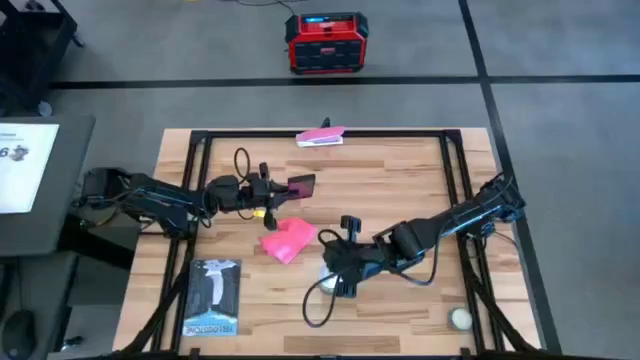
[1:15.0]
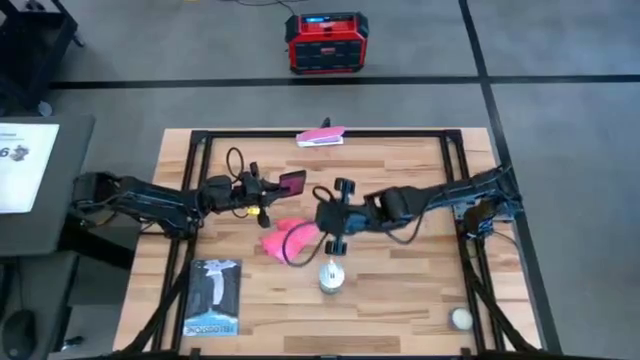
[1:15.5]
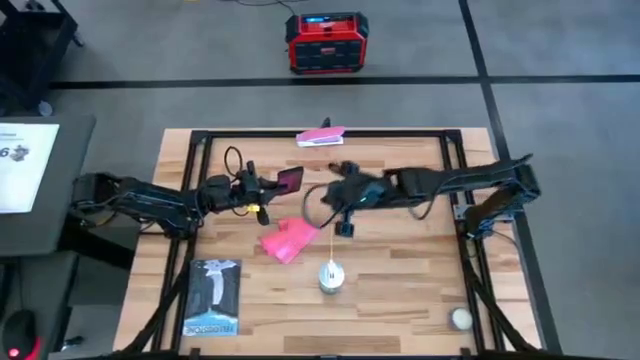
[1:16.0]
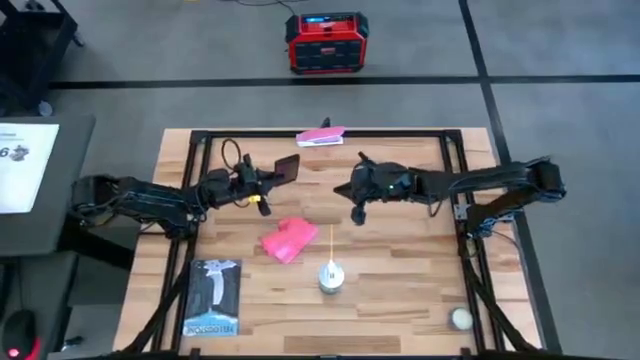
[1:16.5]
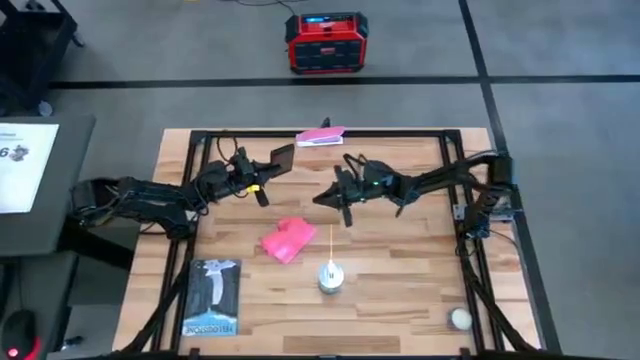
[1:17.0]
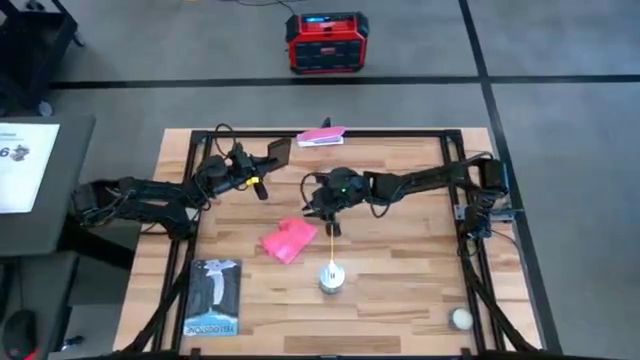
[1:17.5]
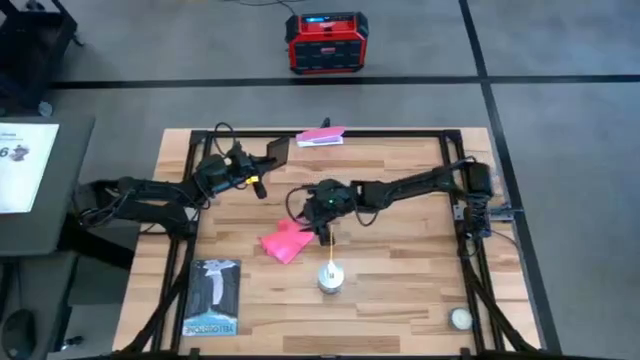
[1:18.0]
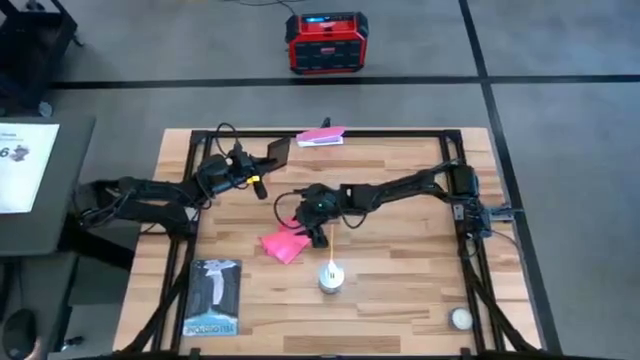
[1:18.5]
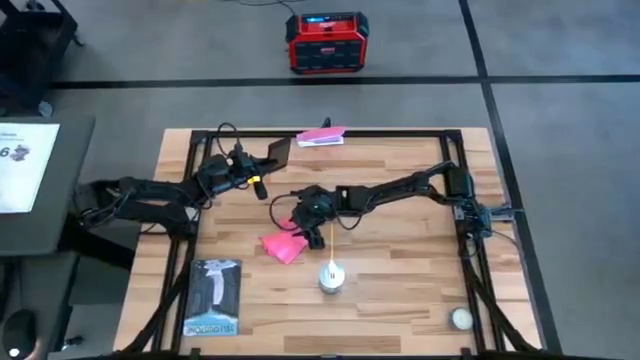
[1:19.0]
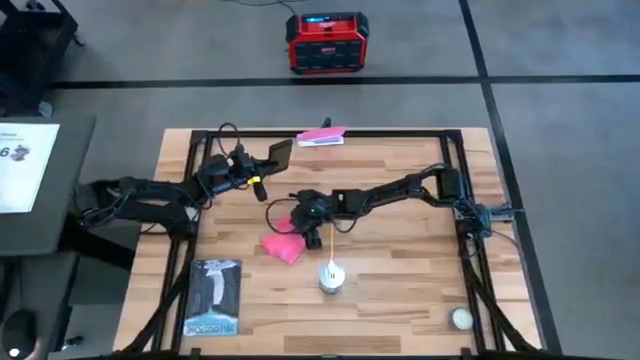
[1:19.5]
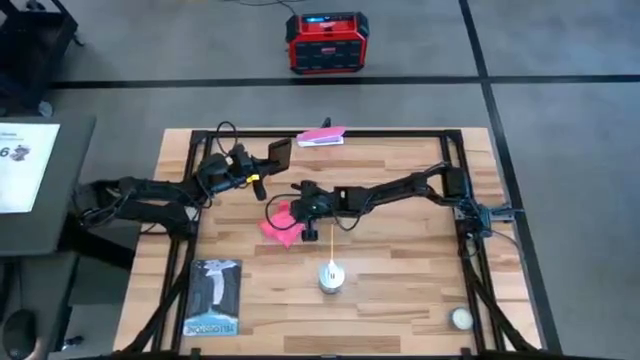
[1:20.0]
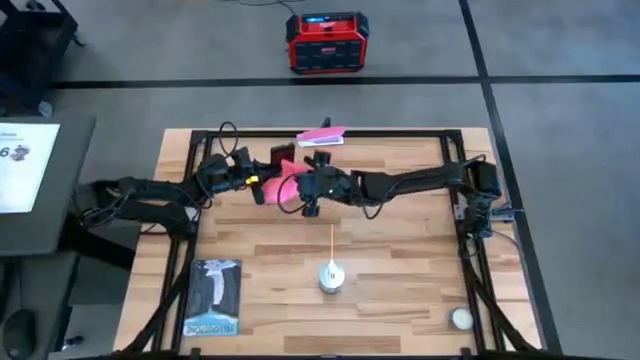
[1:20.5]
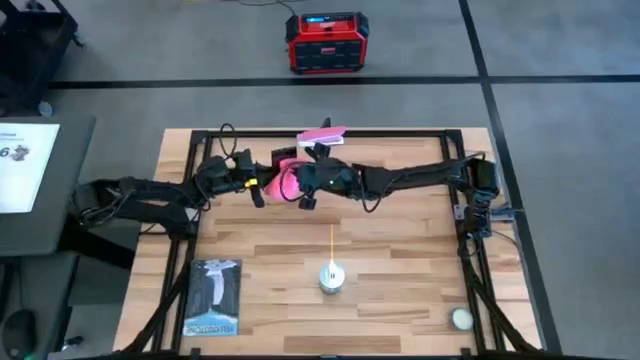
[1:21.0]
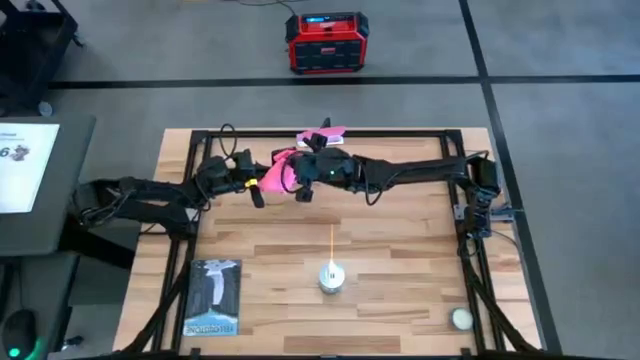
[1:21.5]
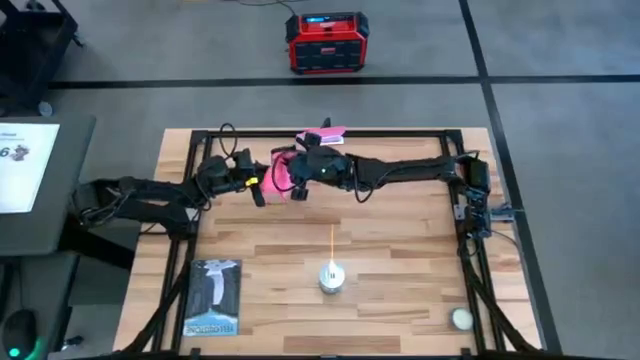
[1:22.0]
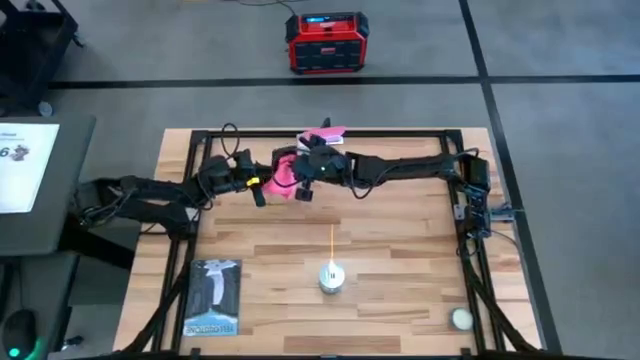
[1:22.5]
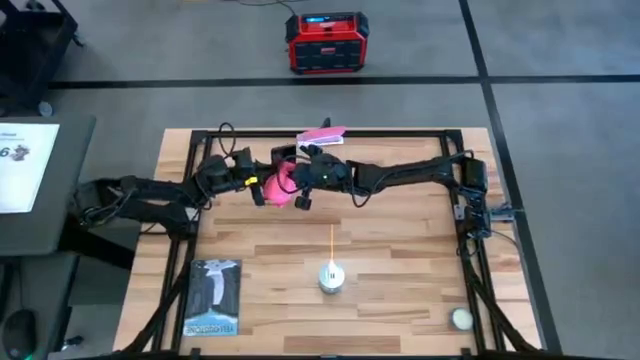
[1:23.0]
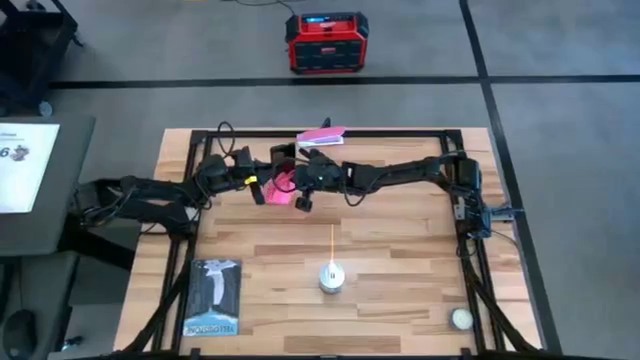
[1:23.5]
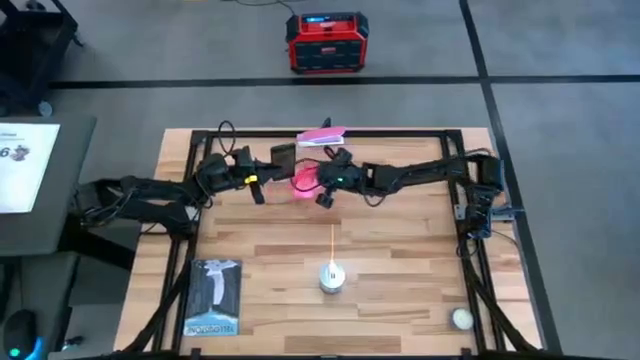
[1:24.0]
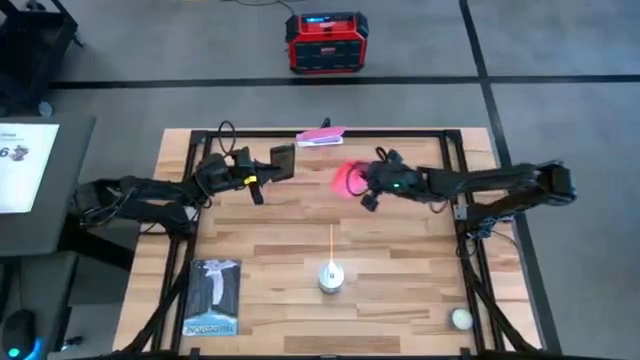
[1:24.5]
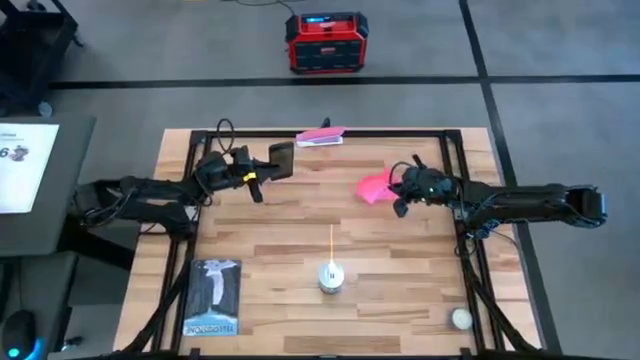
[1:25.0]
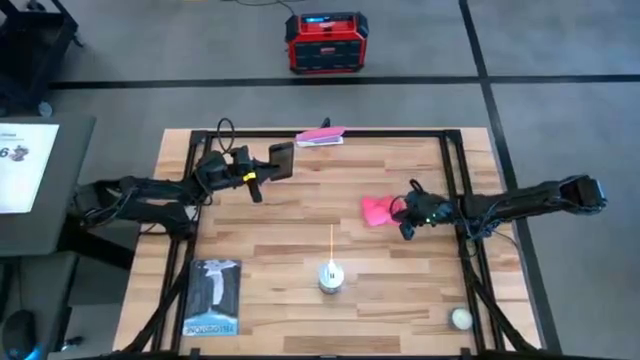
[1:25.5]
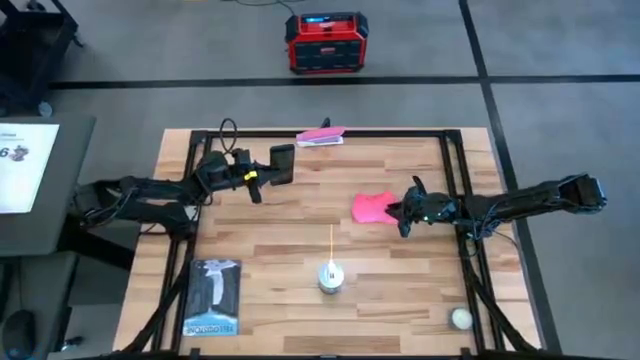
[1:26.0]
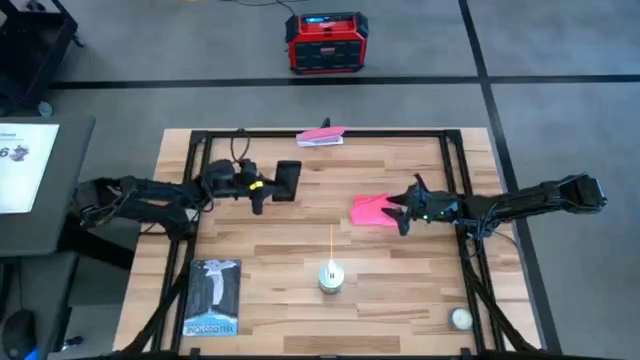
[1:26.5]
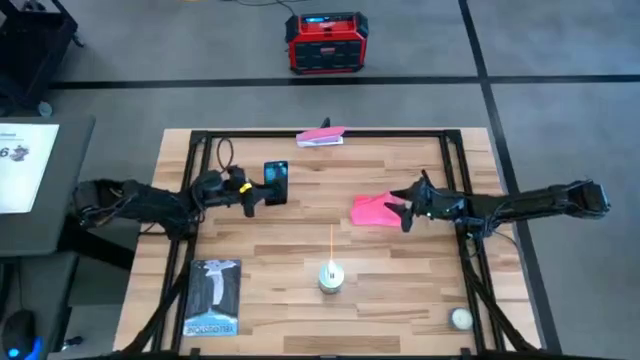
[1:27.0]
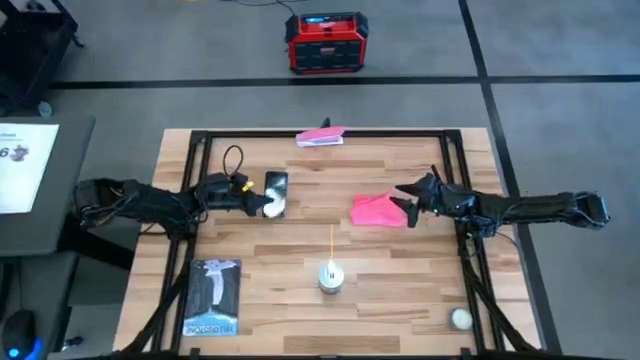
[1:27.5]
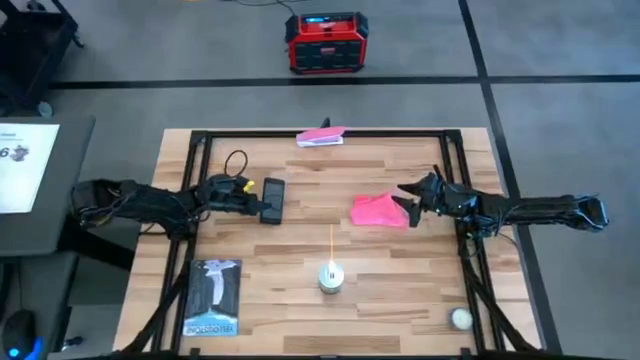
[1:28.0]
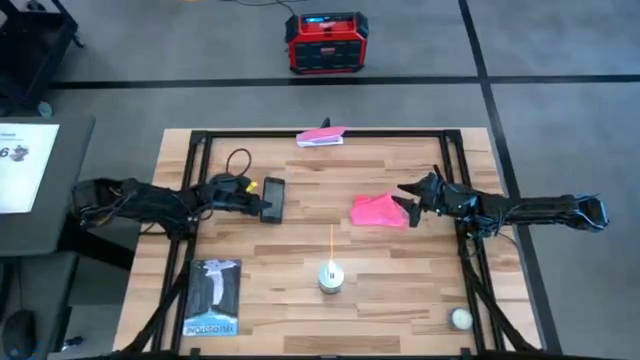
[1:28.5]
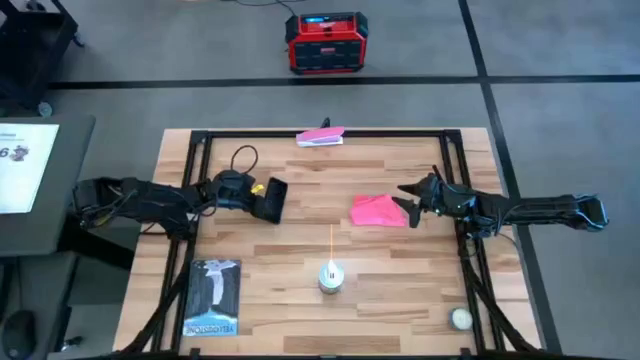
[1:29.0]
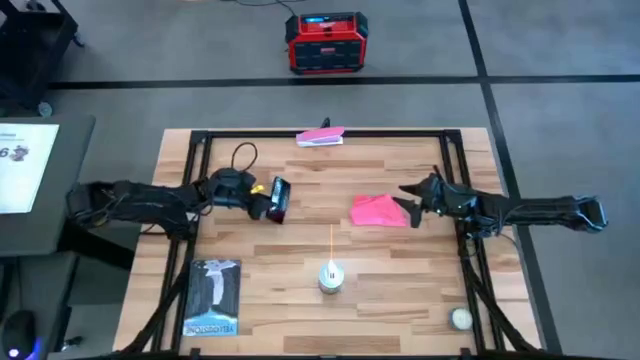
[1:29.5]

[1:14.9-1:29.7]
Task: Apply microfiber cloth
Wipe the black cellphone using the pink microfiber cloth

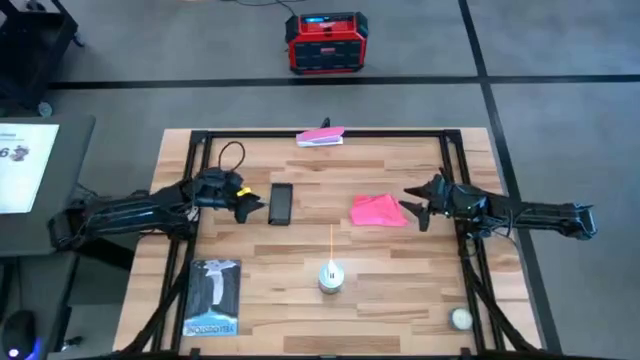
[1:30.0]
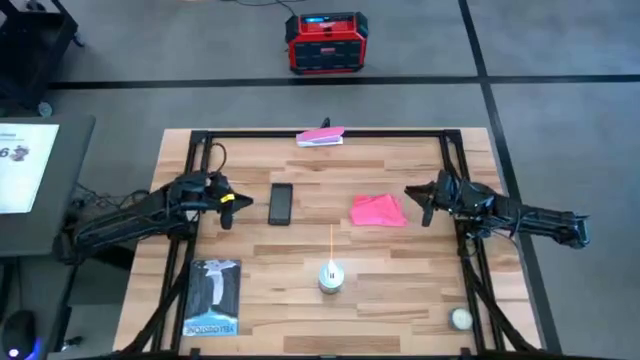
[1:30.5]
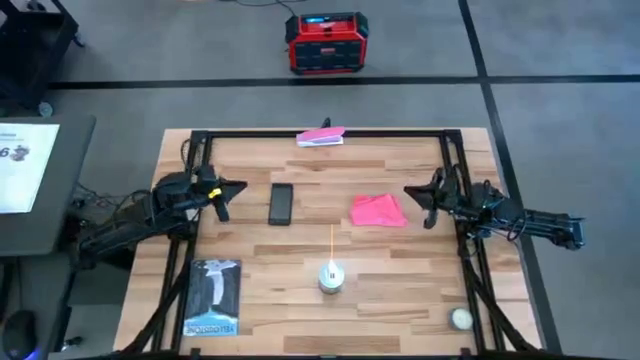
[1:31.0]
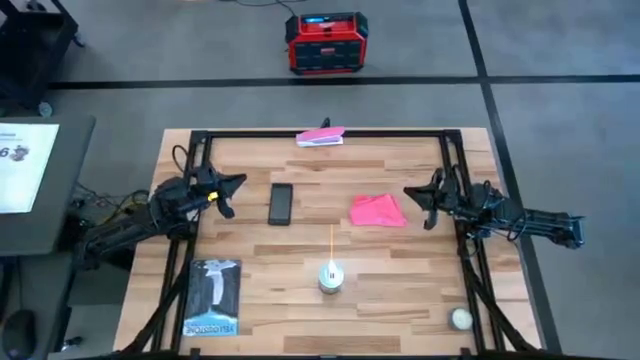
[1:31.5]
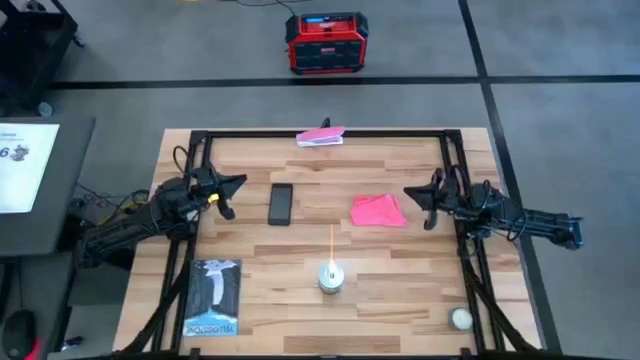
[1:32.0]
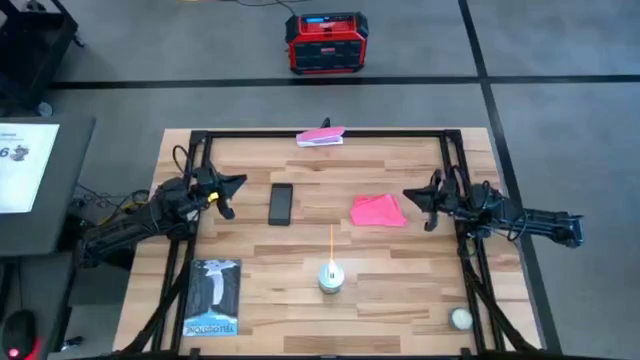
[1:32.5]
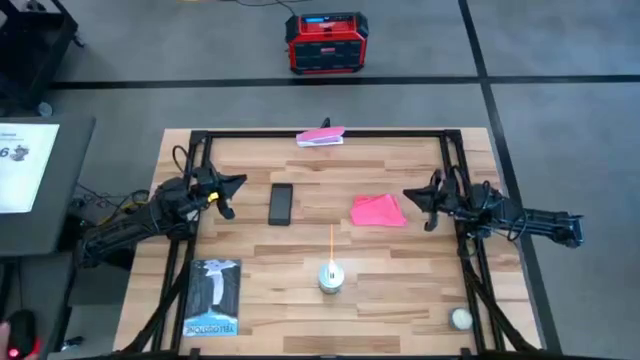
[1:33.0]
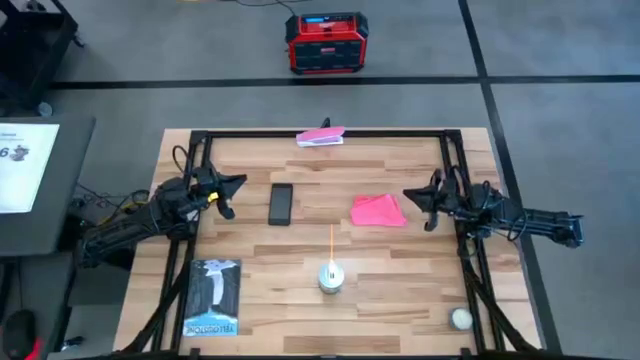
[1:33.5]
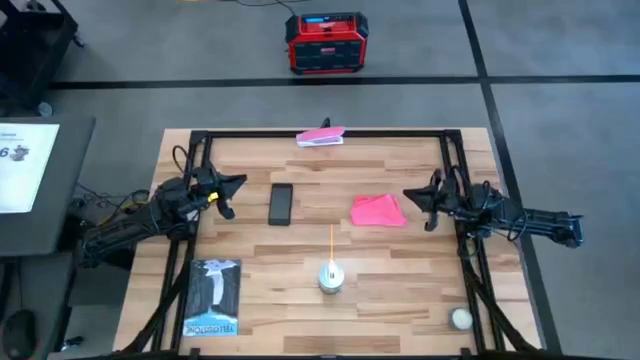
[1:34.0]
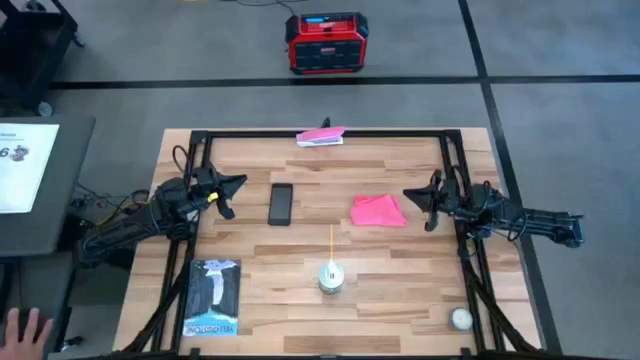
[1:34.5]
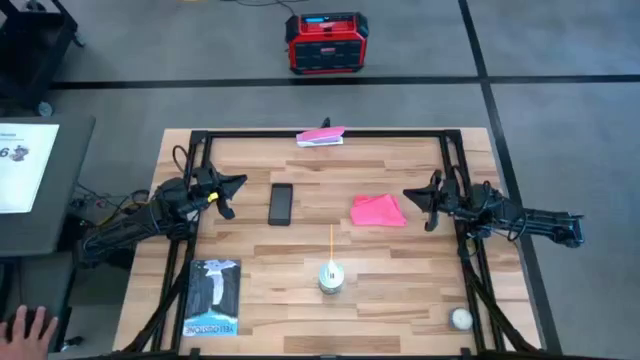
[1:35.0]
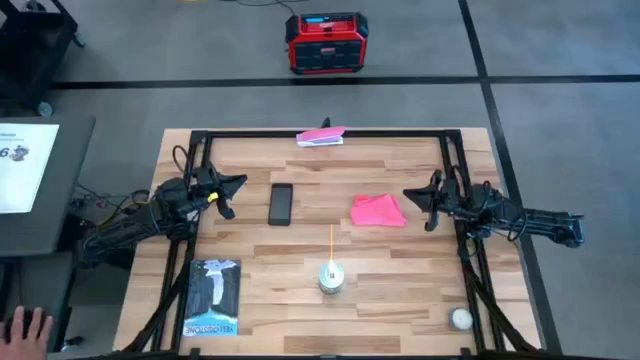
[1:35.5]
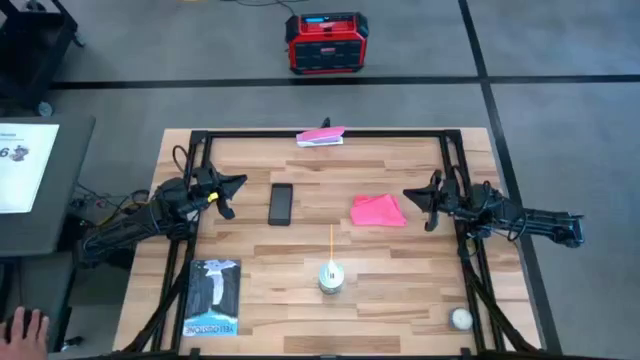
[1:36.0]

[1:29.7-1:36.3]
Return to Home Position
